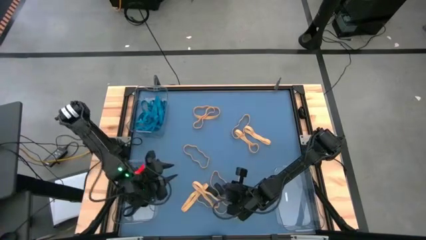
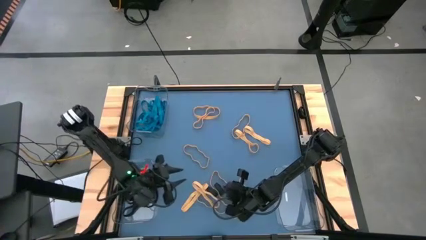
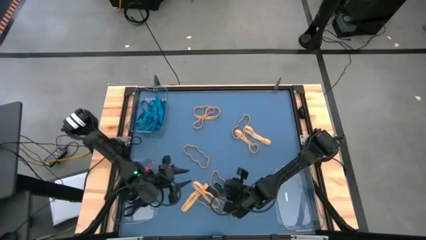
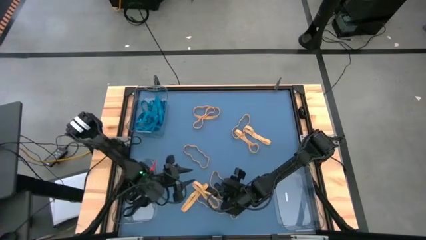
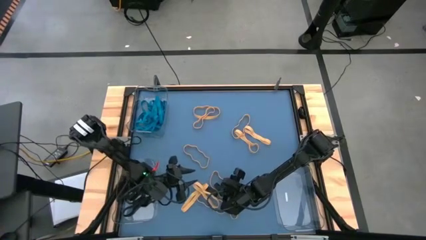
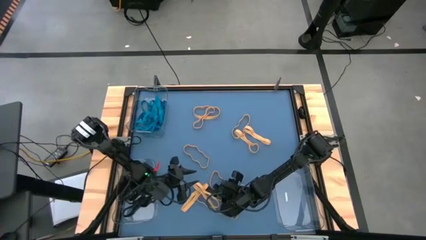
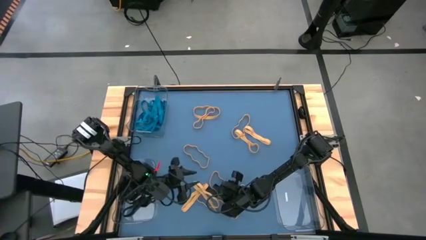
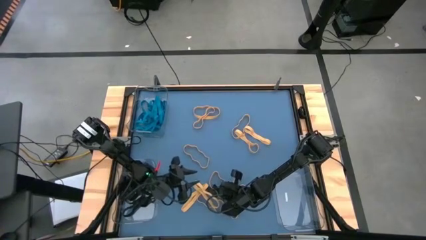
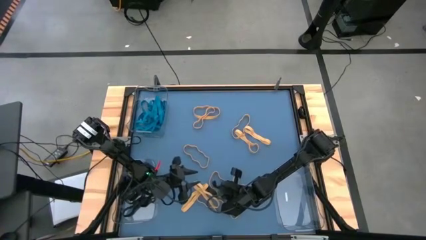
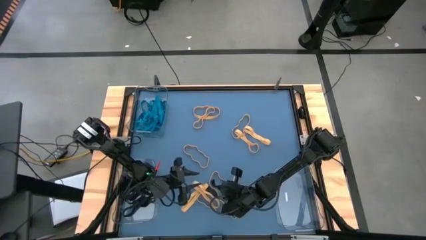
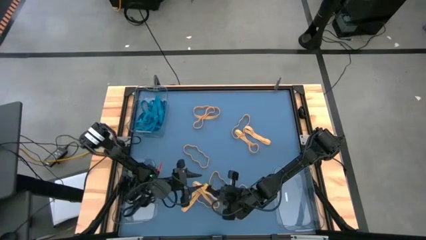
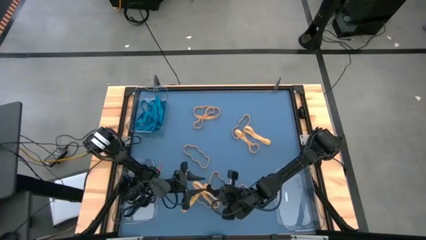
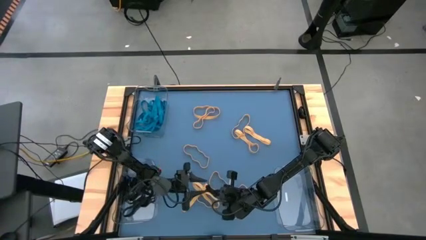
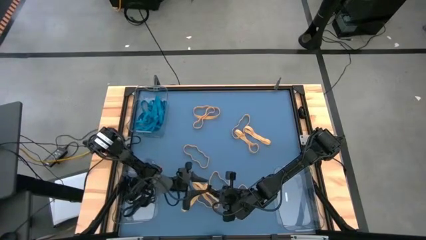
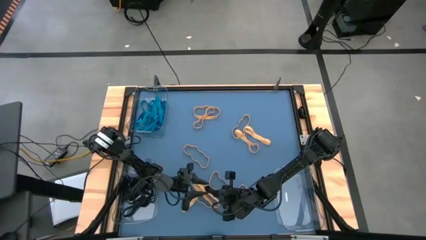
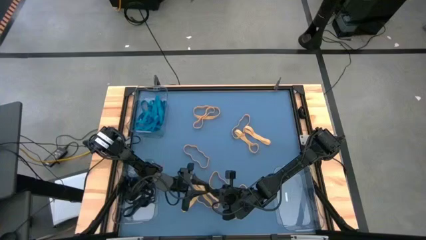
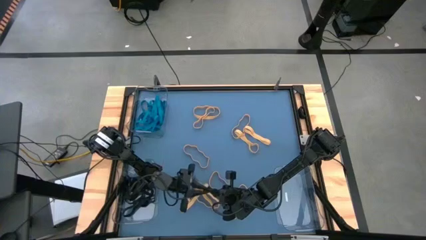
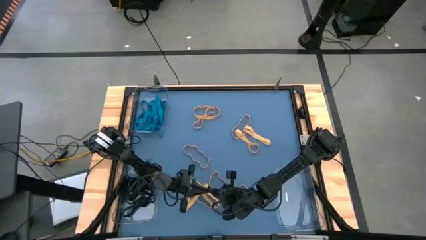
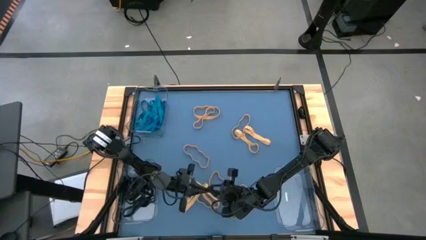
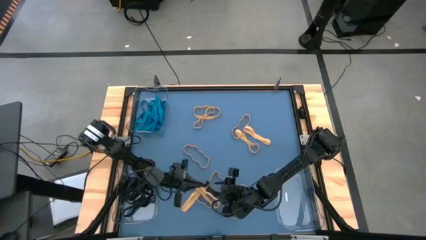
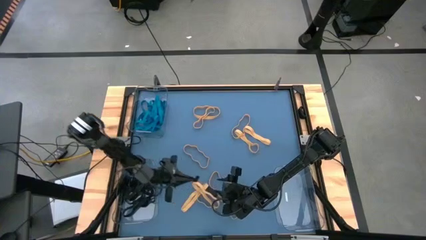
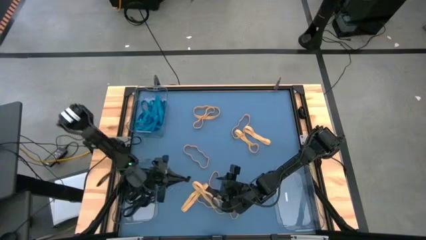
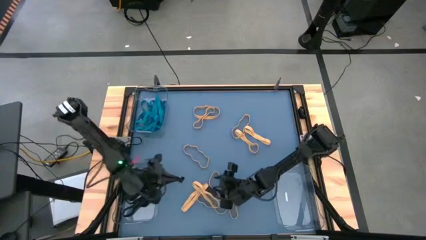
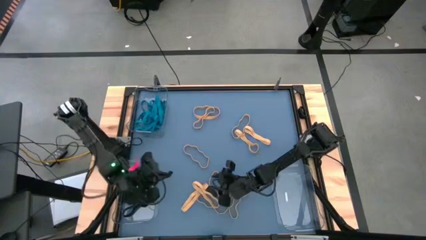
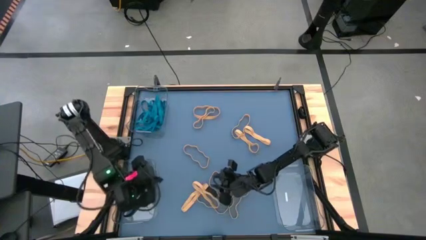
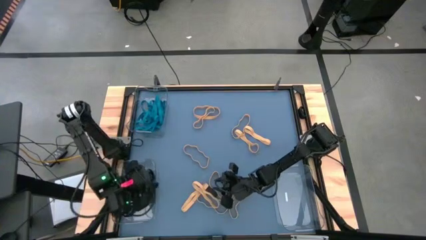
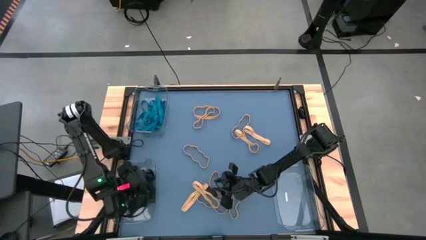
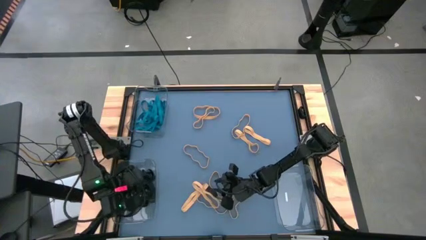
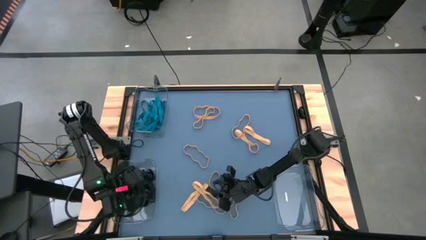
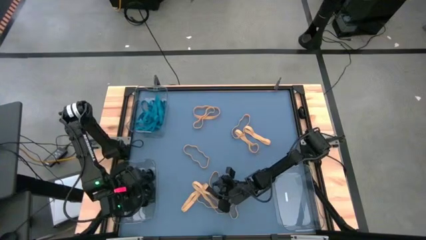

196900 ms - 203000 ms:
Task: Sort rubber bands into baskets
Put the black rubber band into the bottom left transparent bin

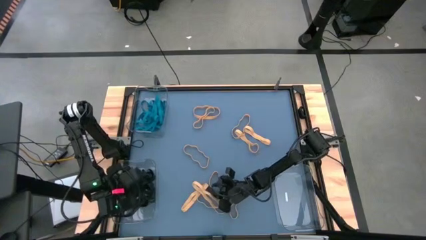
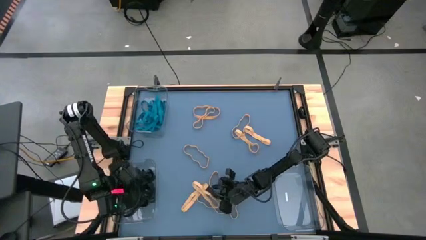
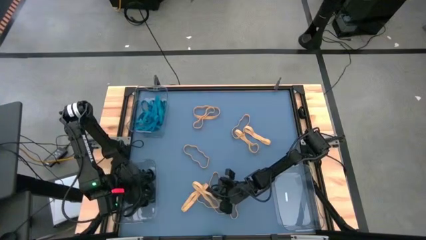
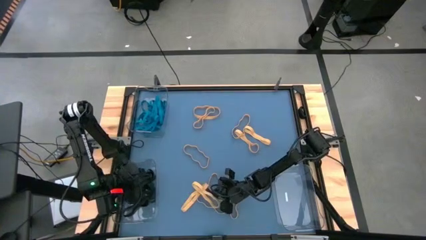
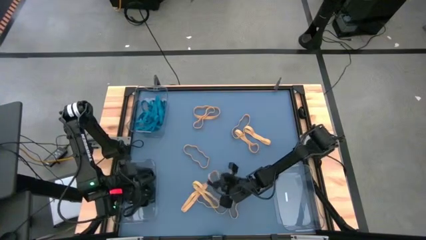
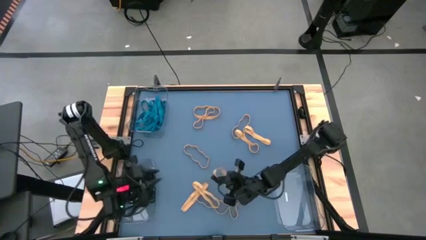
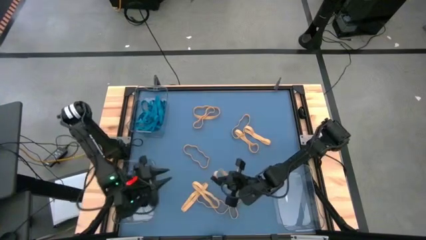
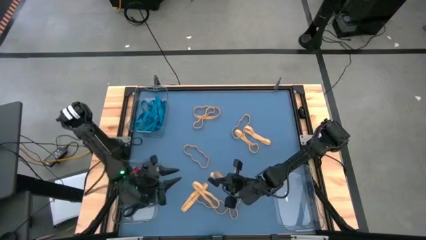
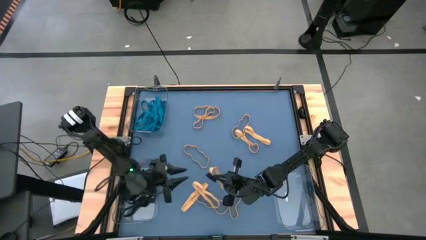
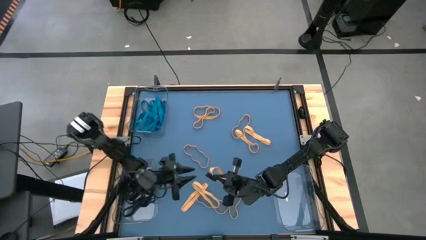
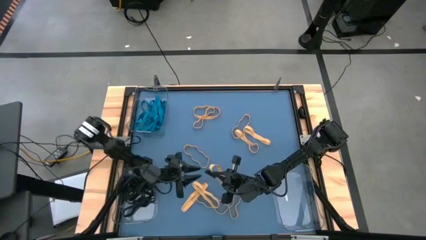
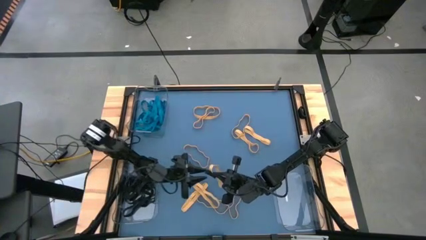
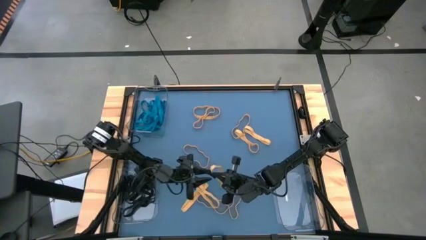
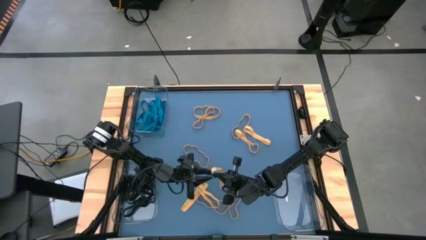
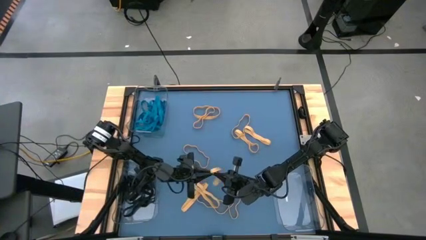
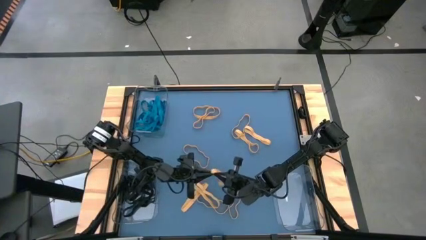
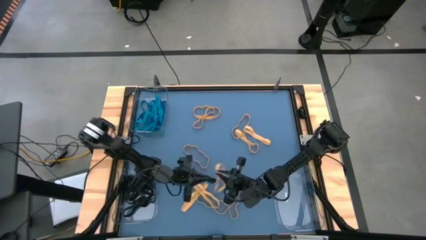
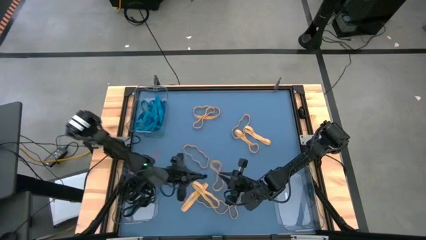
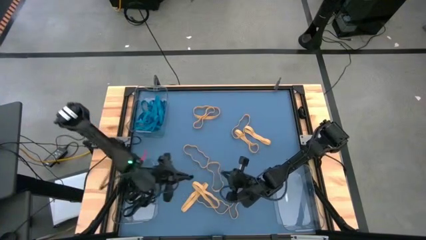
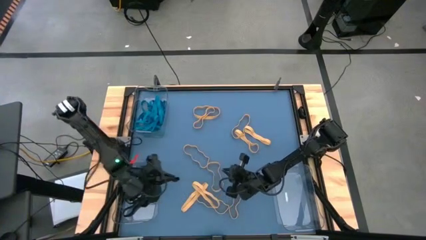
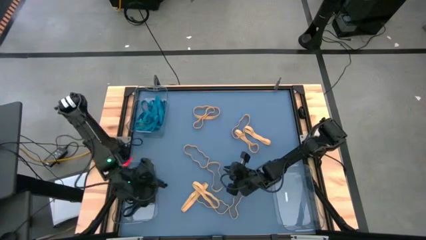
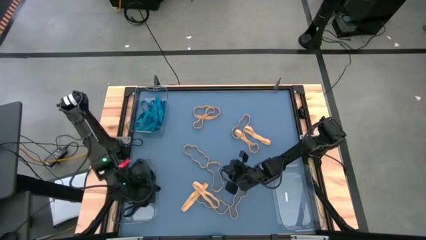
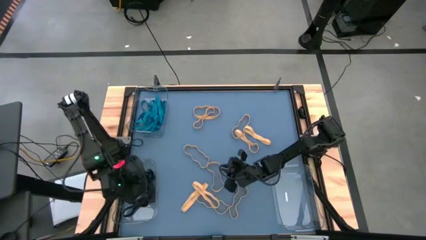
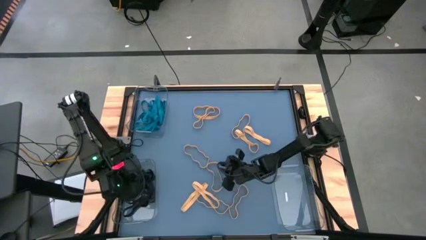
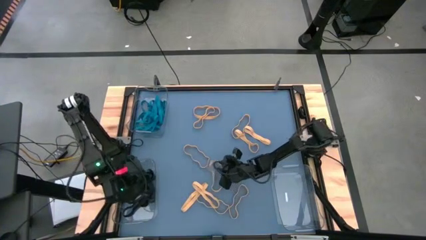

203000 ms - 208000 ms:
Put the black rubber band into the bottom left transparent bin

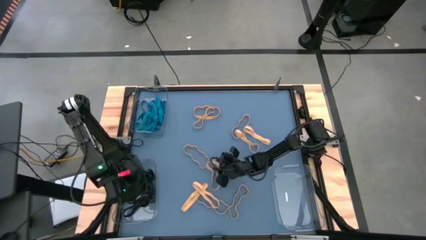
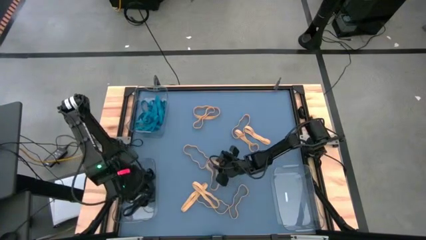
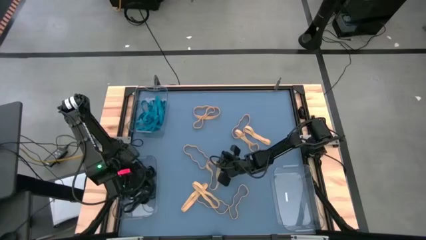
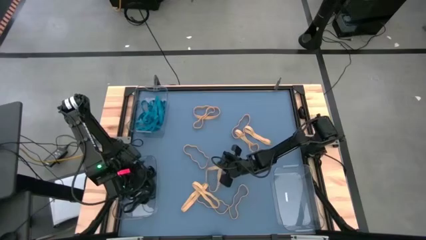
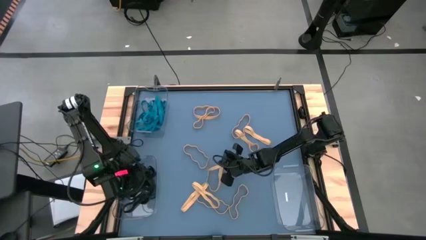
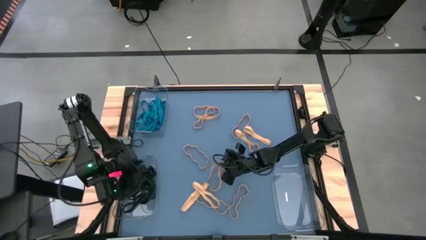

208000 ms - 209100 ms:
Put the yellow rubber band into the bottom right transparent bin

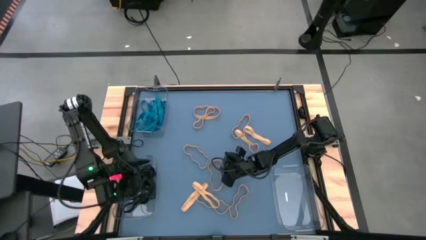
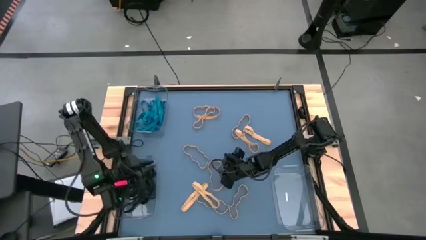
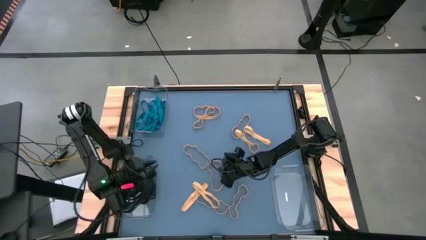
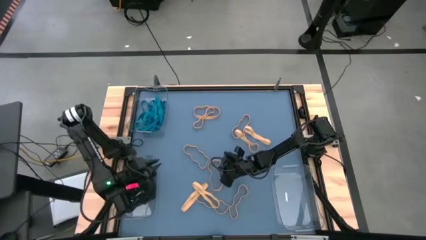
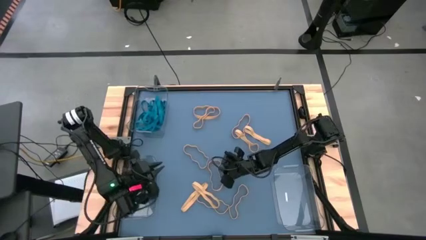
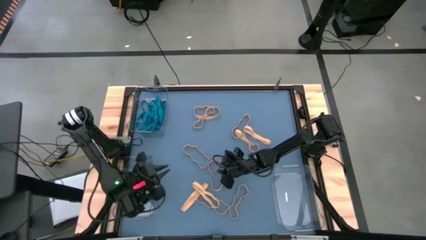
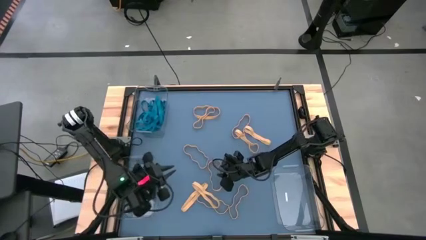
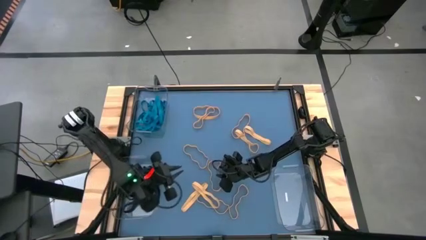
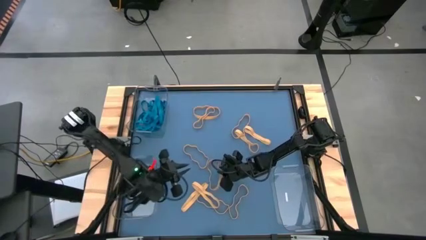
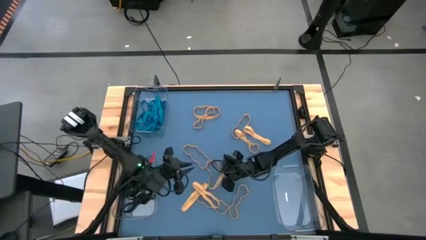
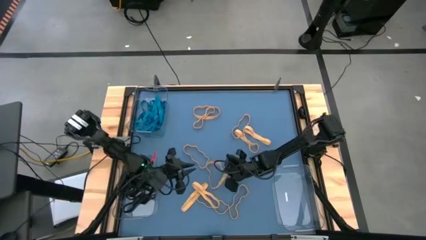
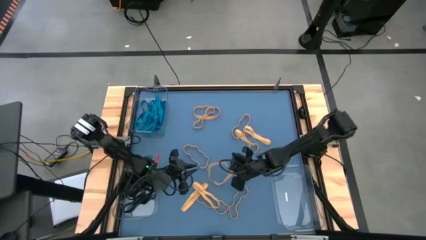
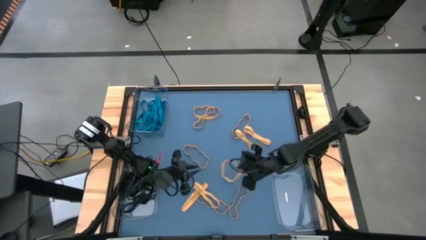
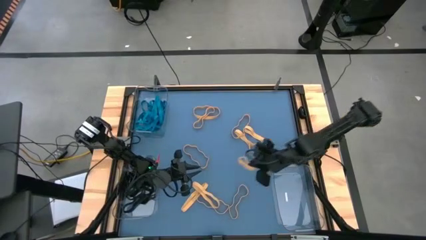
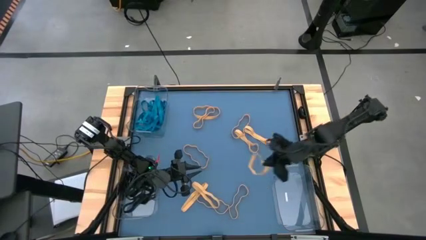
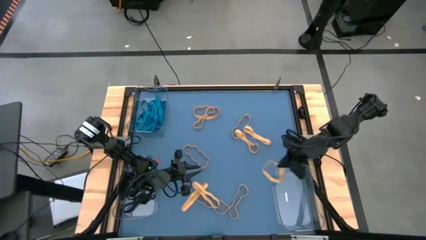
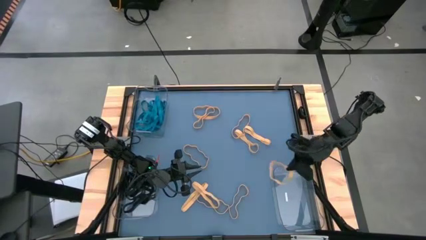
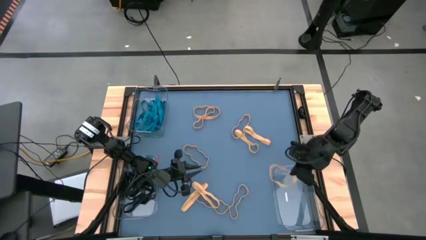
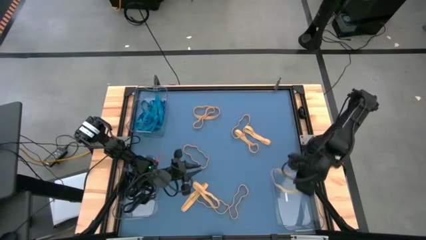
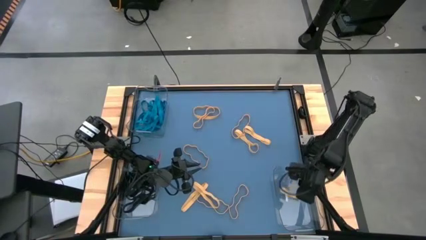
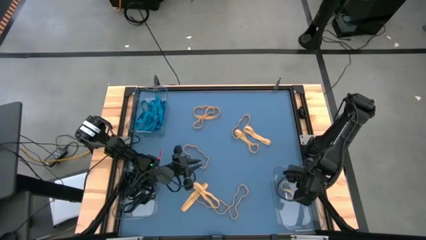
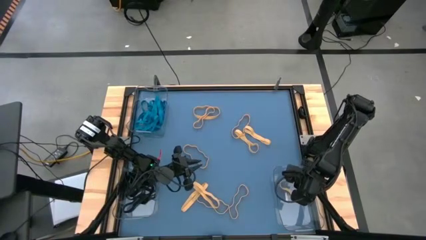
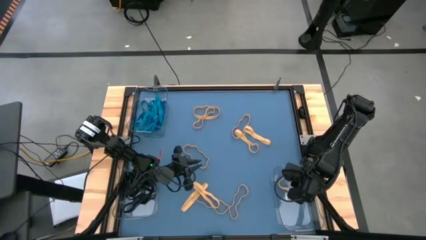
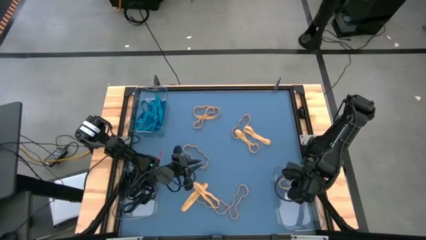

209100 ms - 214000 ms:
Put the yellow rubber band into the bottom right transparent bin
